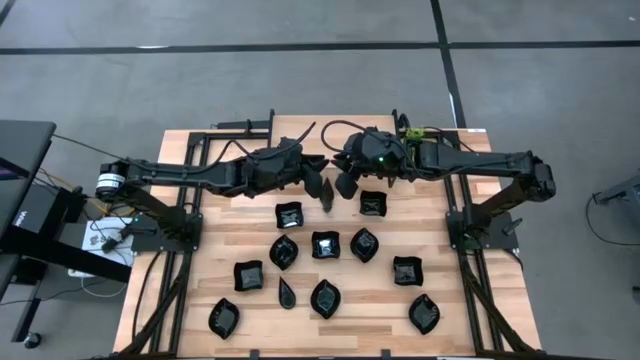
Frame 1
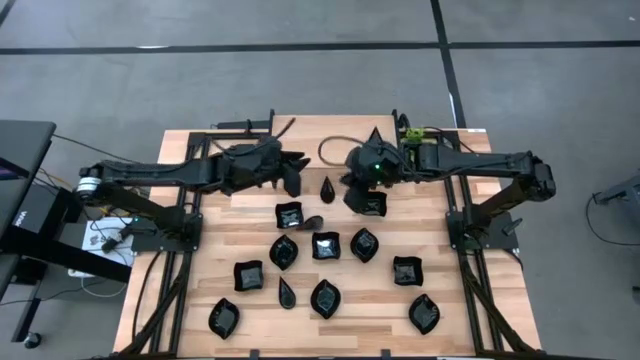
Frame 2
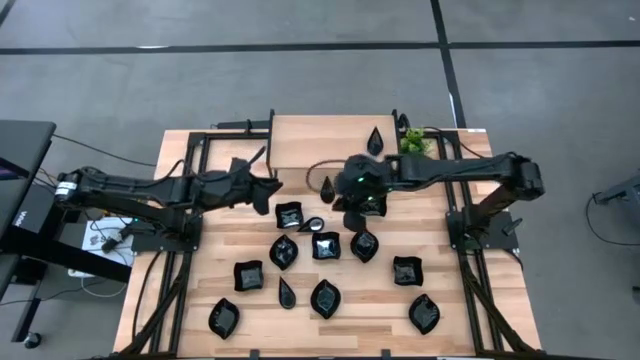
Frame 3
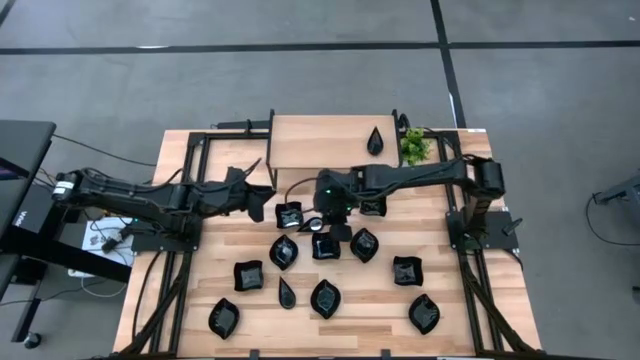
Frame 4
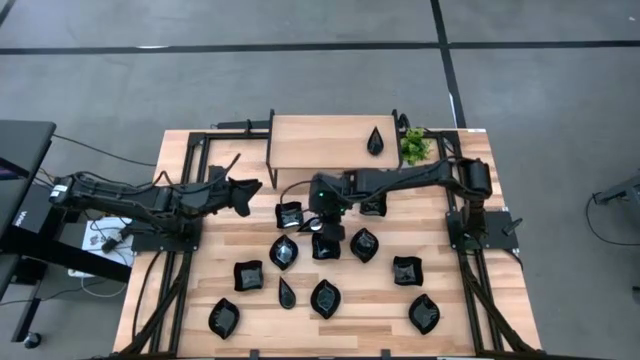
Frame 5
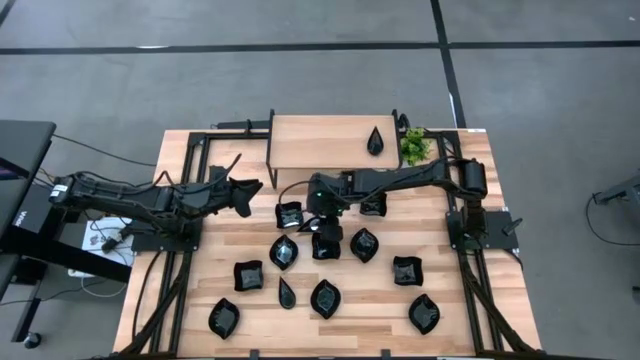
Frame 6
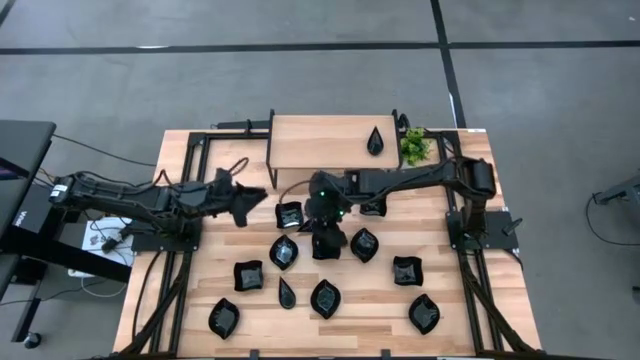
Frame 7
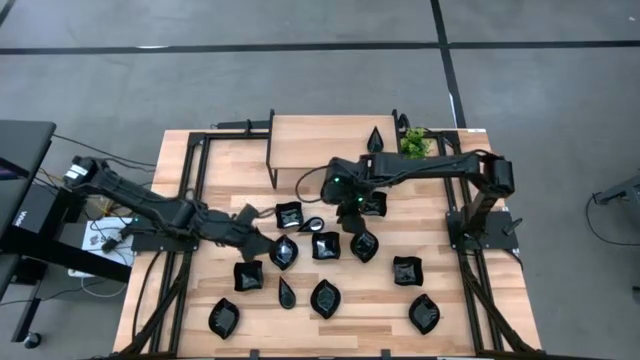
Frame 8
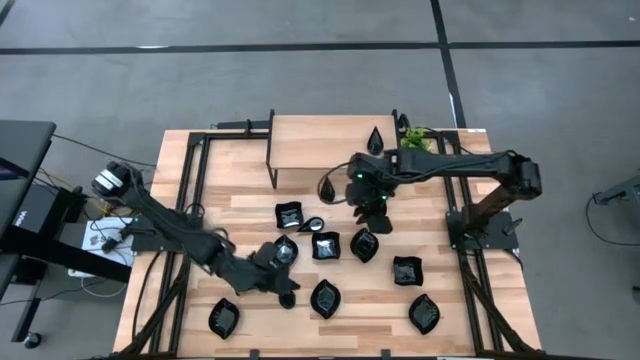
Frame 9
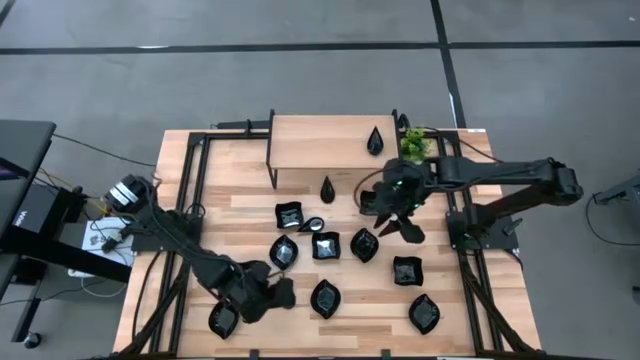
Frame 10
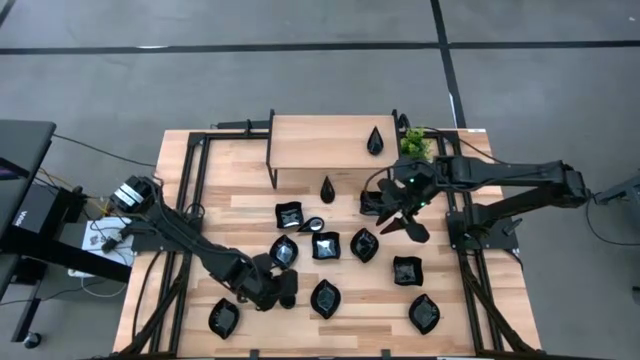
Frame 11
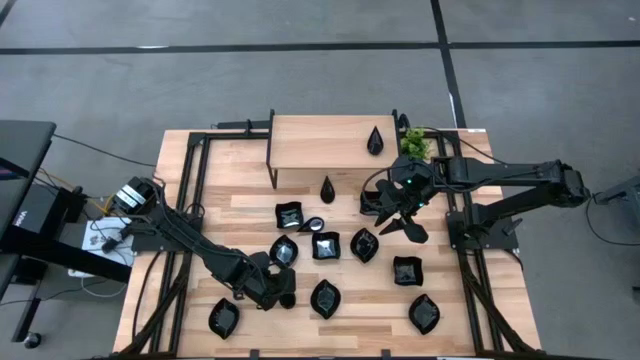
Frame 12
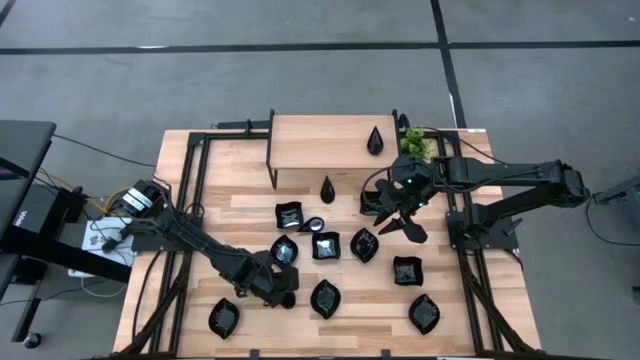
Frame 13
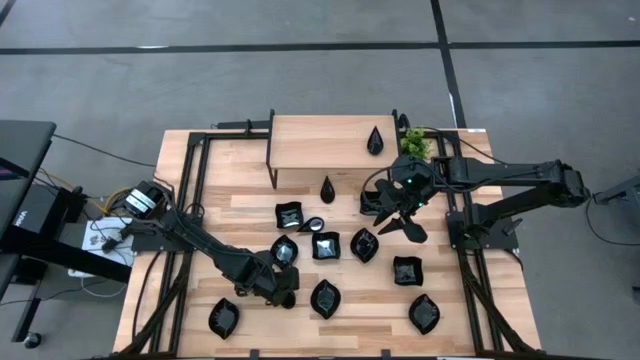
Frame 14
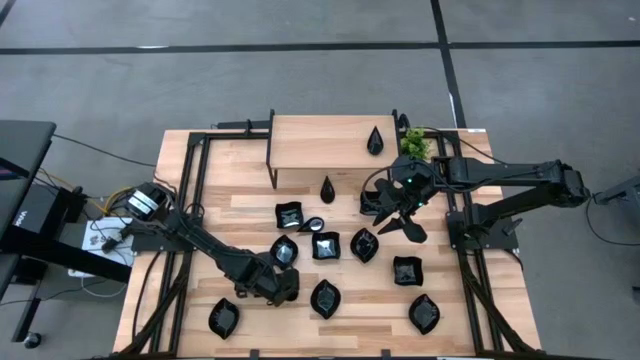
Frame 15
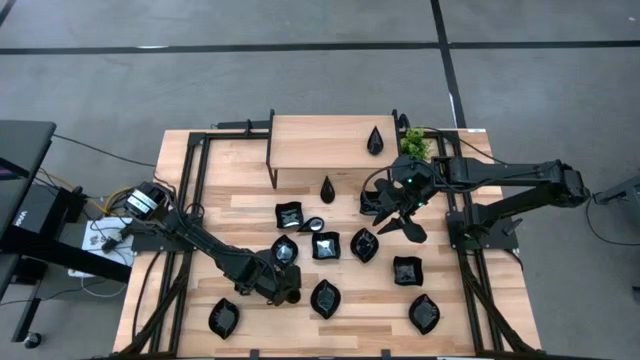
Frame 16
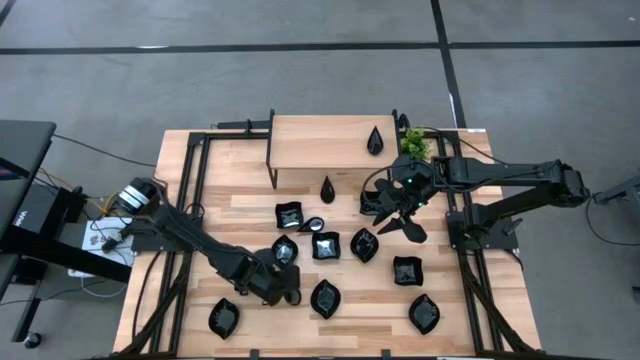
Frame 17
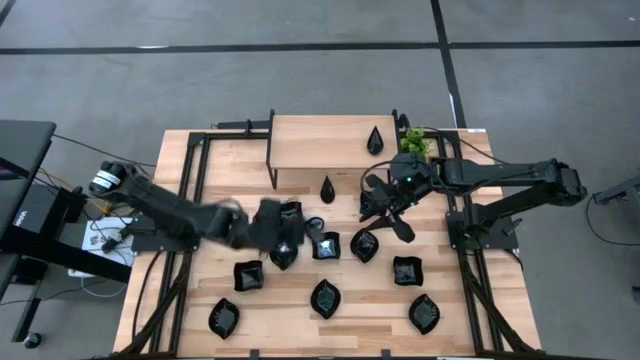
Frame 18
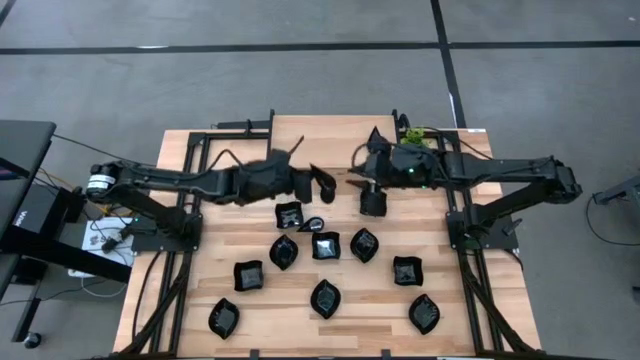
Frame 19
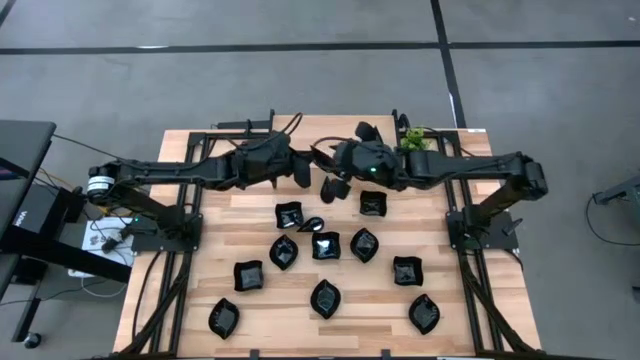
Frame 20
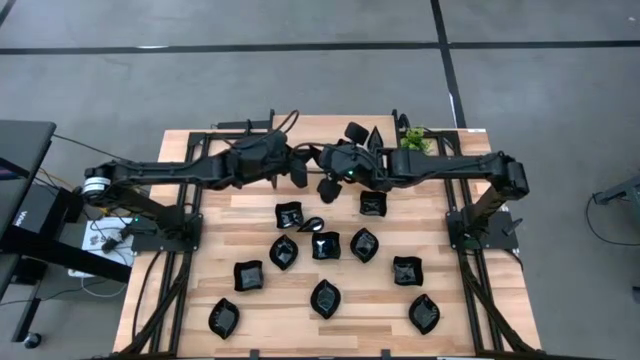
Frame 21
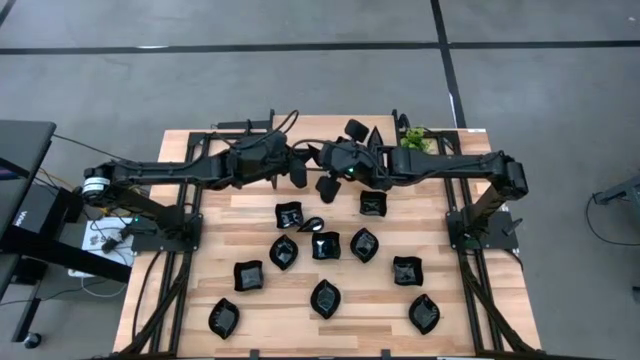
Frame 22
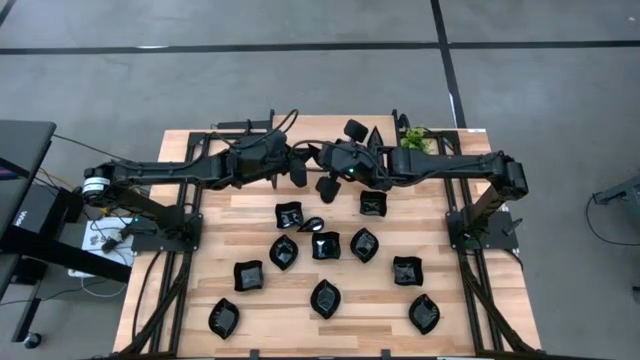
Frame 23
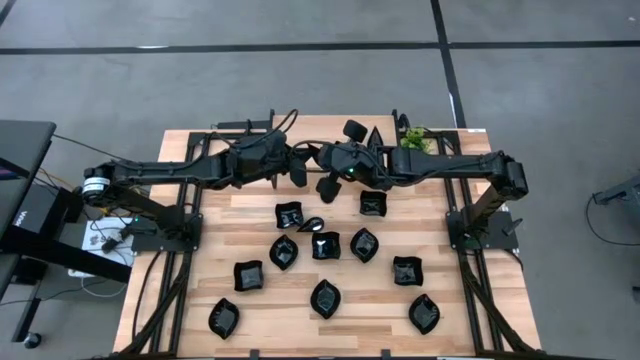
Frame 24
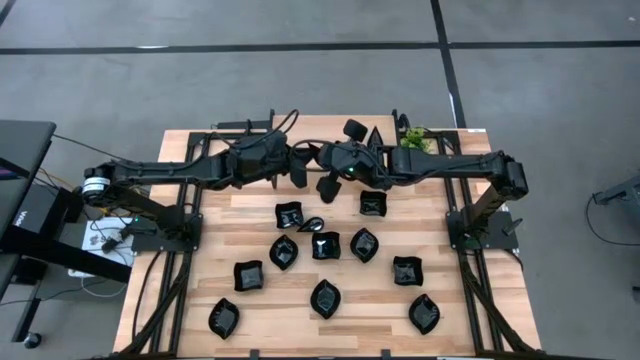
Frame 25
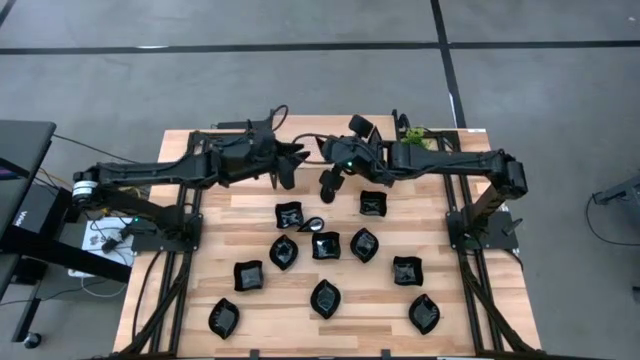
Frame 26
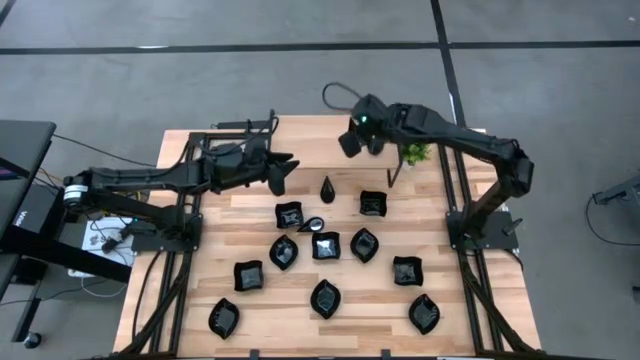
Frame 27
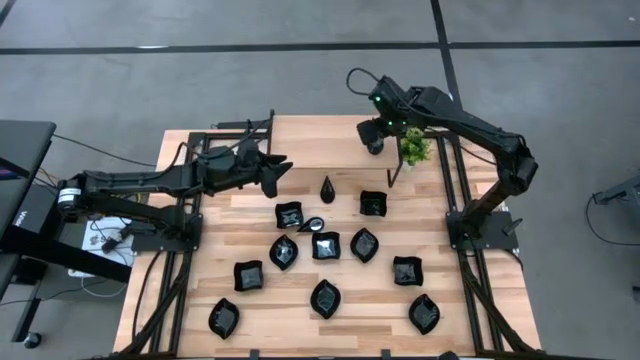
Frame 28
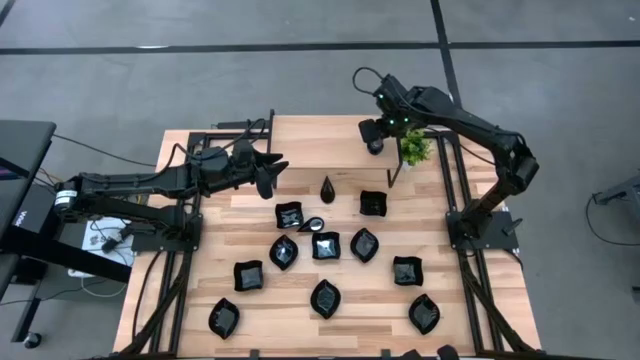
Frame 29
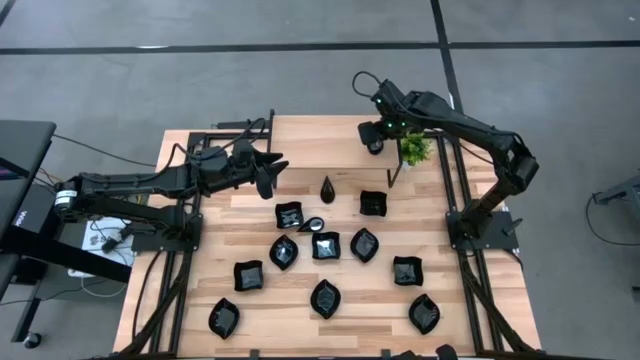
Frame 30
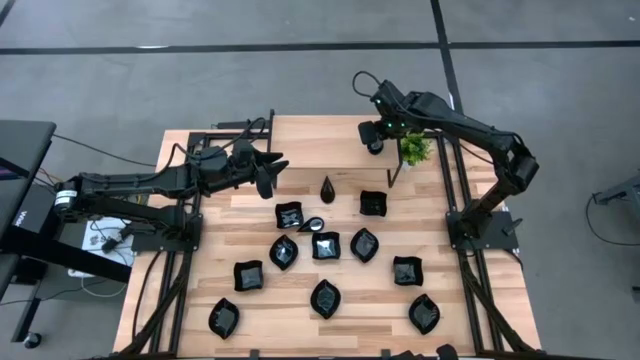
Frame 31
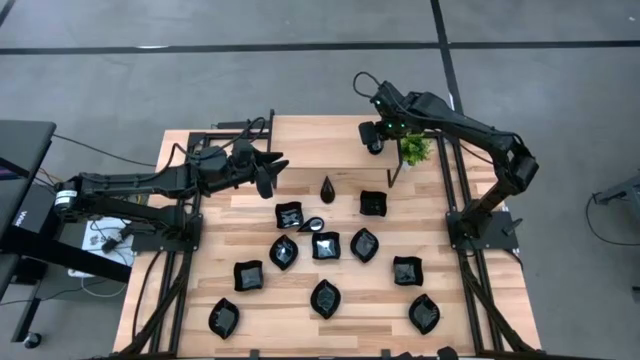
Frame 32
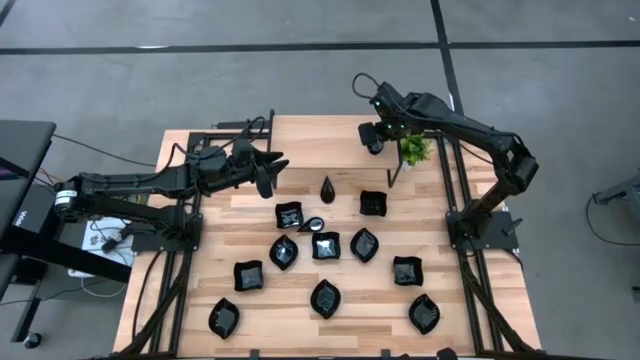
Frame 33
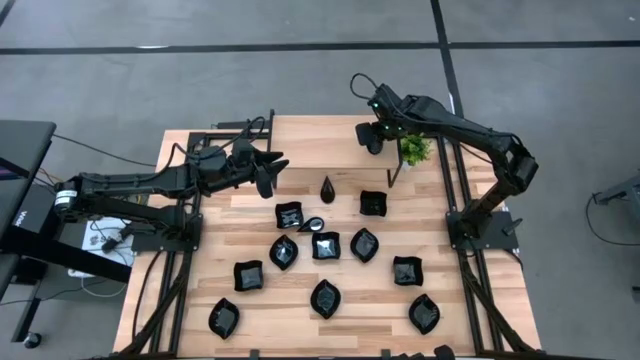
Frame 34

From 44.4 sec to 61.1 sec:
Task: Pick & Place Mini shaped plates
Stack the drop-shaped plate on top of the drop-shaped plates on the shelf
